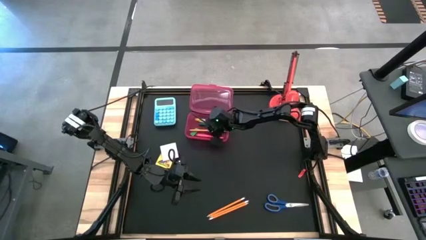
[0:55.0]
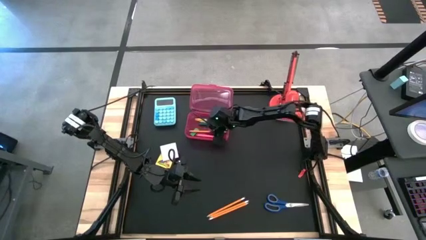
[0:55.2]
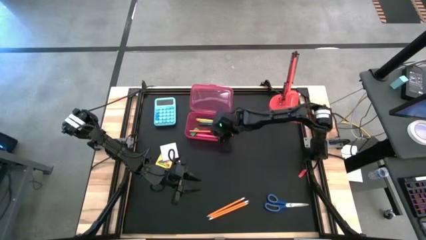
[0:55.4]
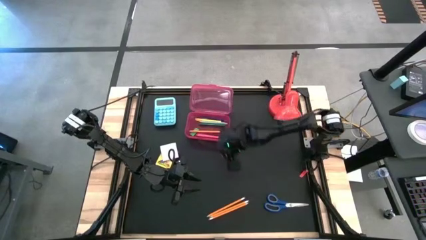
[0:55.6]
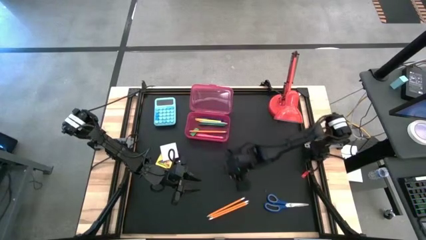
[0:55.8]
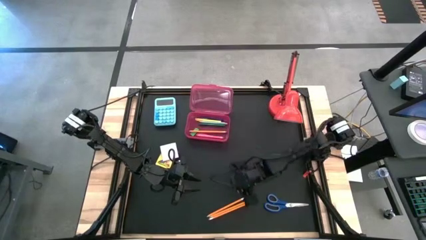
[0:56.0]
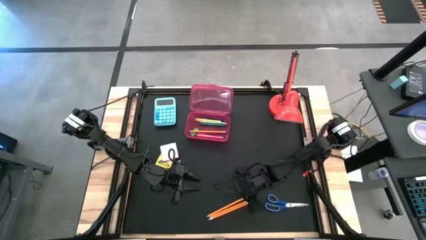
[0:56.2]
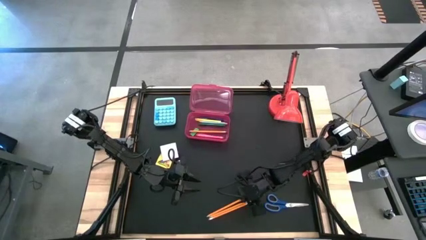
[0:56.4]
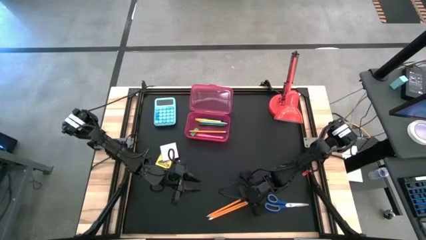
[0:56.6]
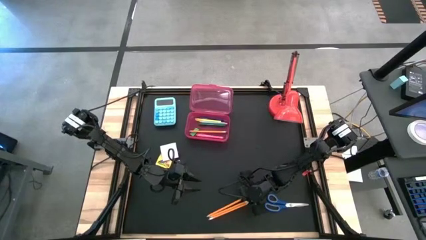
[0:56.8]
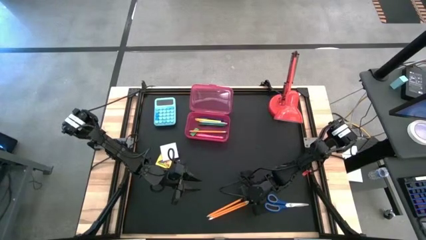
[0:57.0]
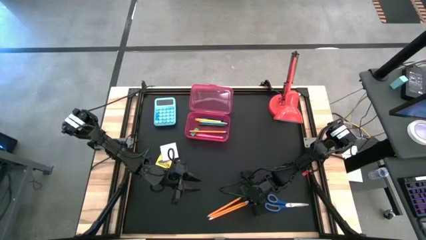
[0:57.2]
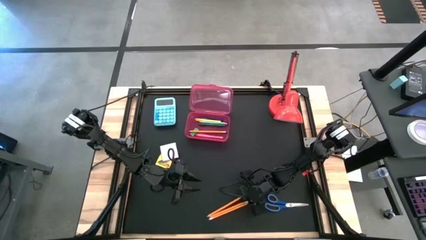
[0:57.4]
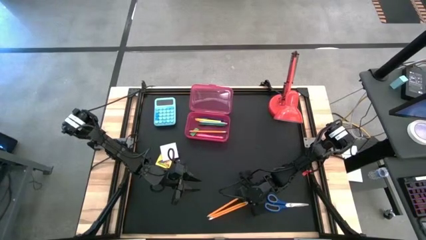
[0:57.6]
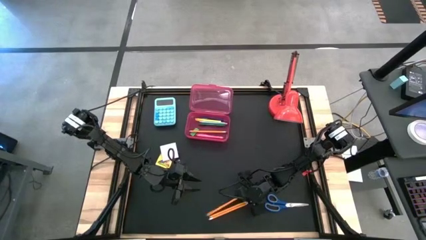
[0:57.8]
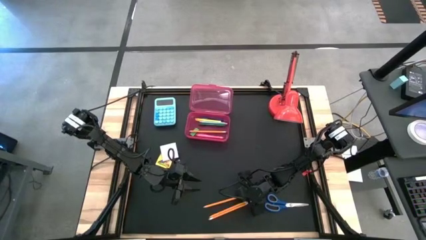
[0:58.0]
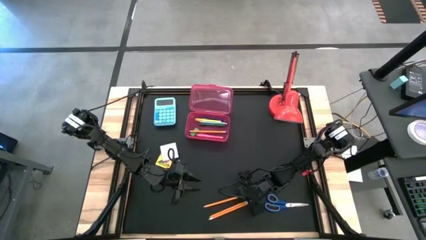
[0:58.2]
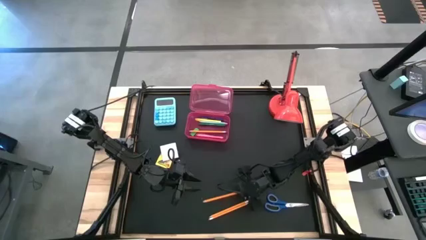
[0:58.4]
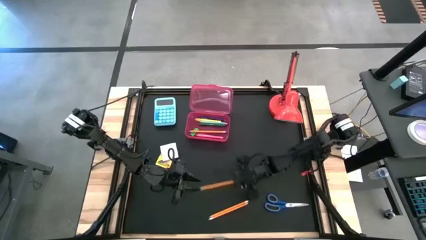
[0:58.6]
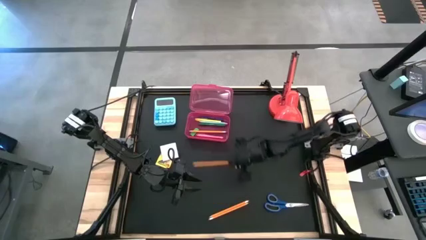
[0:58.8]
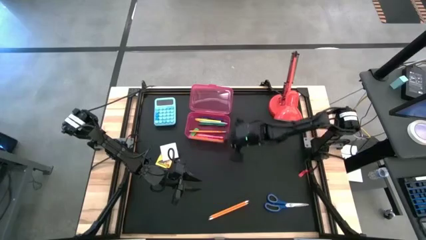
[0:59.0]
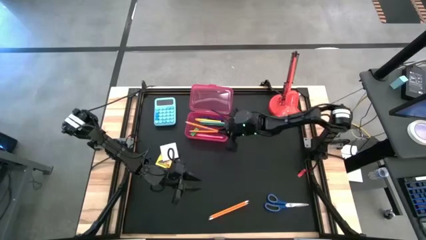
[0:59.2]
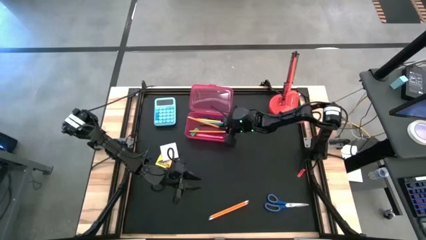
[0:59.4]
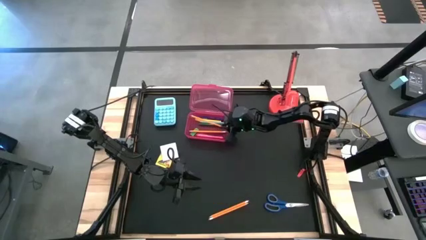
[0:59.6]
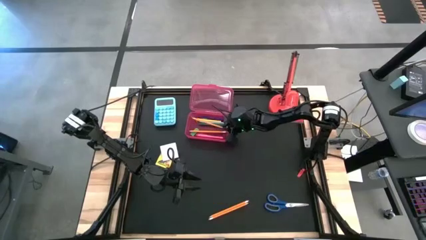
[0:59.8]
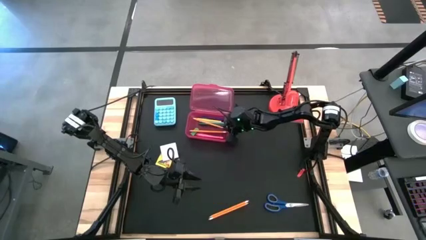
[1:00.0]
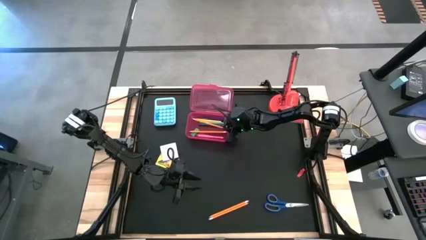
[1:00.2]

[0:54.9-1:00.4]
Task: Pack school essentials
Put the top yellow pencil into the pink supply box

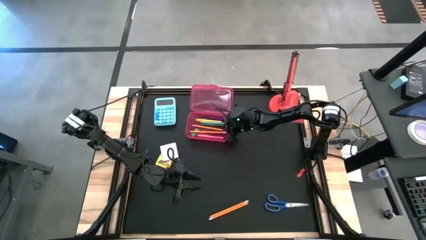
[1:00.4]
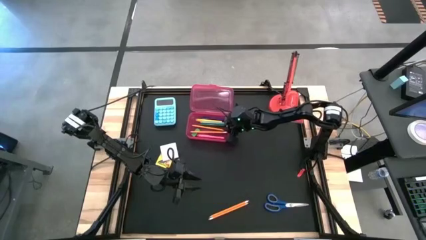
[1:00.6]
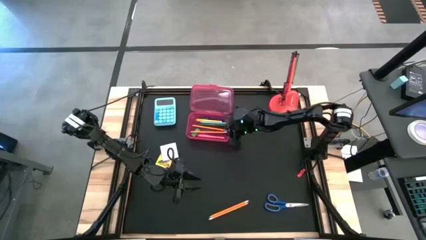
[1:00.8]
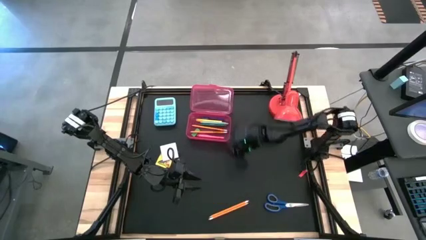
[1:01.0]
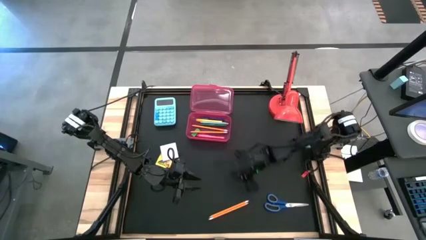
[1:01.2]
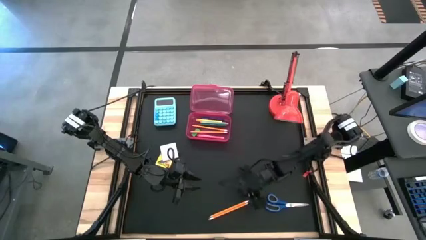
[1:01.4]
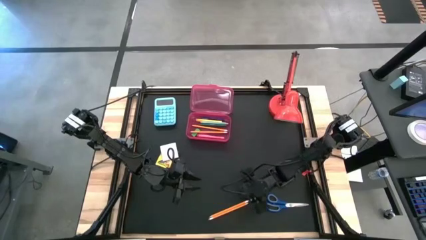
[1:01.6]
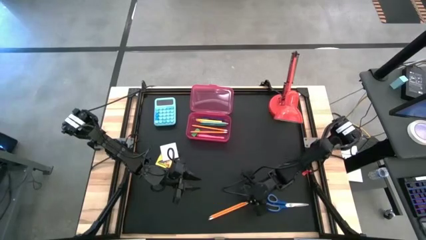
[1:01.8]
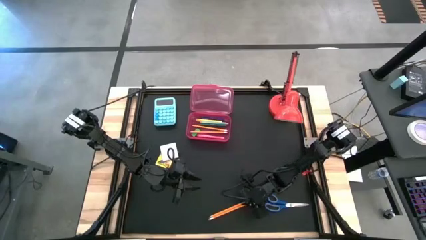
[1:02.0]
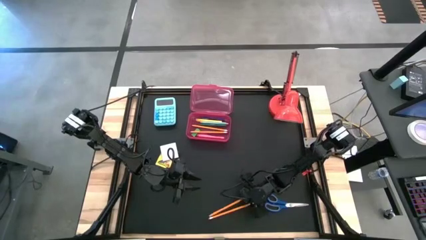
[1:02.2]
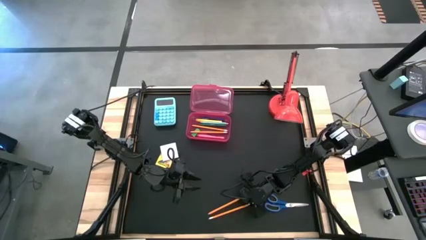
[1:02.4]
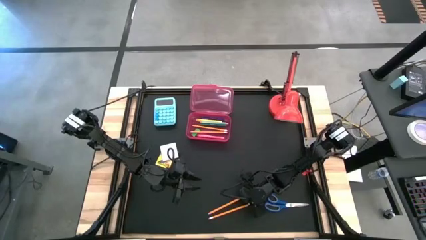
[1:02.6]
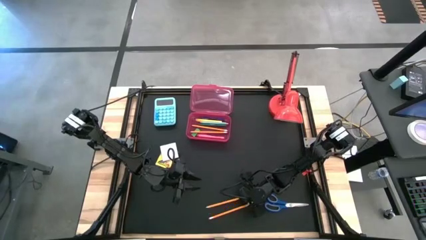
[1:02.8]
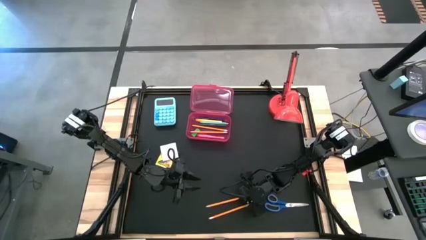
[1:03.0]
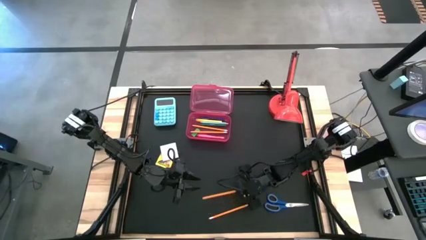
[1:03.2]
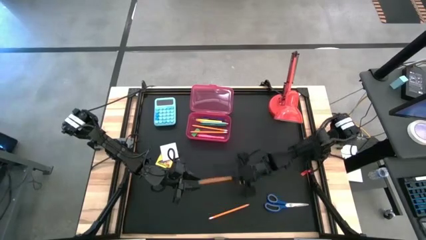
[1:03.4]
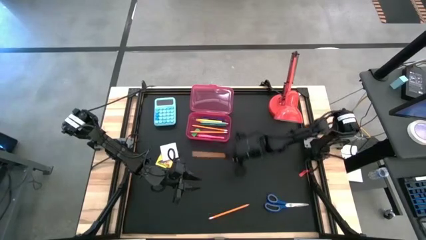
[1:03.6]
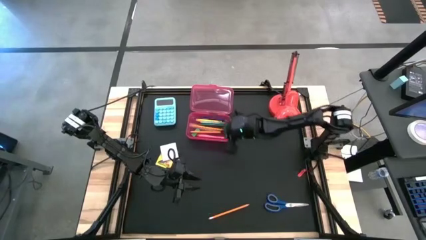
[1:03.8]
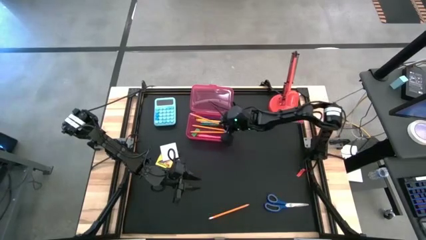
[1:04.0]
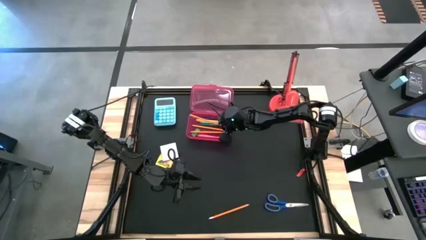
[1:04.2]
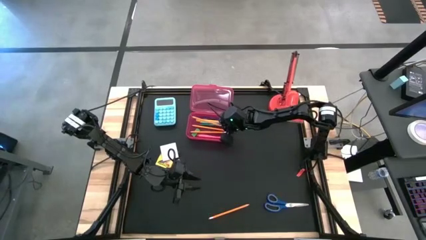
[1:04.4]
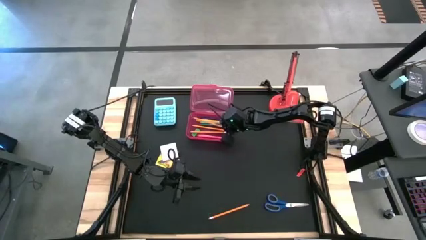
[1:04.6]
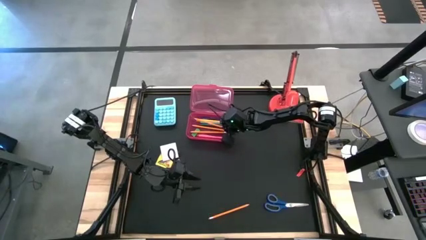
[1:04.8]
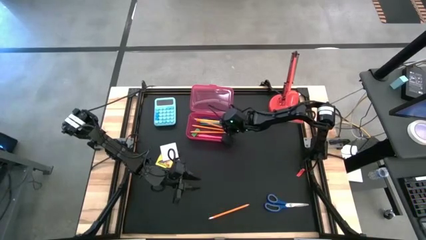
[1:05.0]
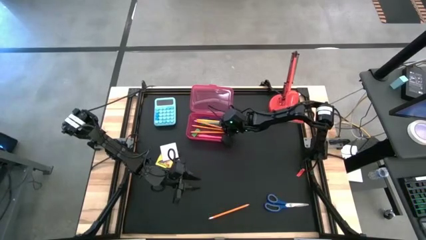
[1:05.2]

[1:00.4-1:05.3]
Put the top yellow pencil into the pink supply box

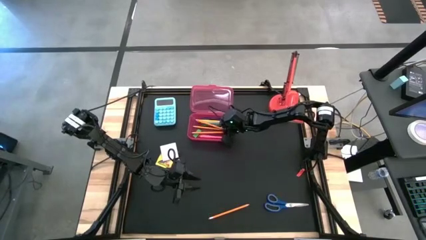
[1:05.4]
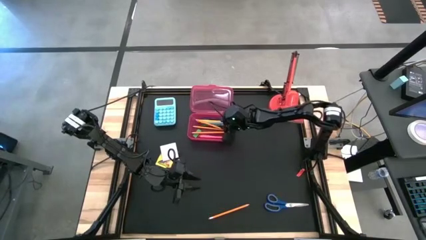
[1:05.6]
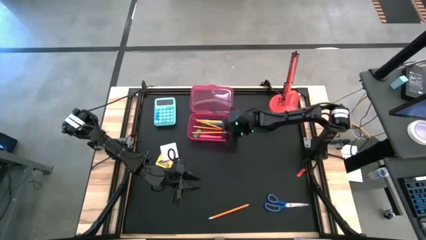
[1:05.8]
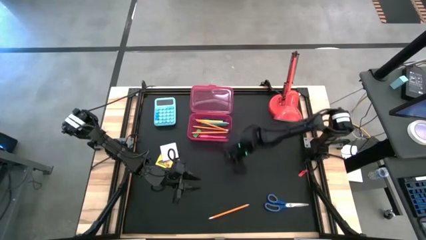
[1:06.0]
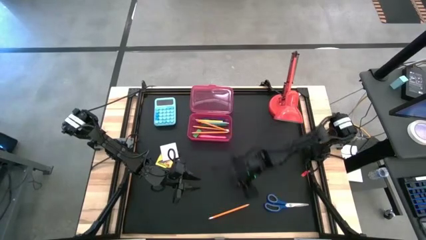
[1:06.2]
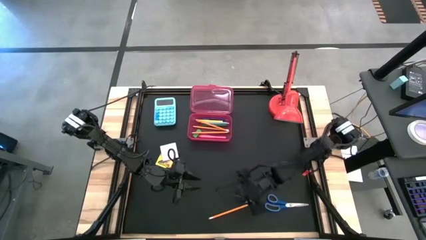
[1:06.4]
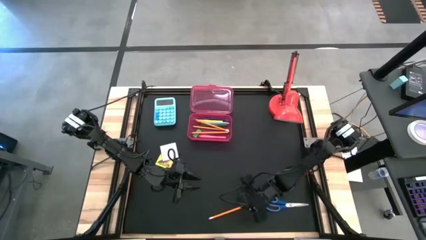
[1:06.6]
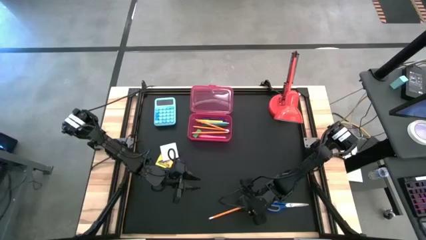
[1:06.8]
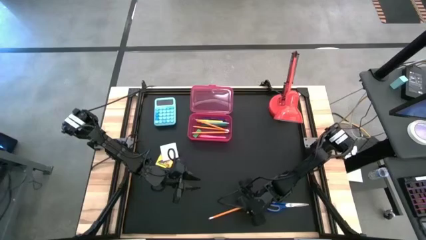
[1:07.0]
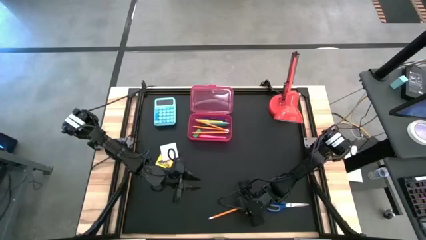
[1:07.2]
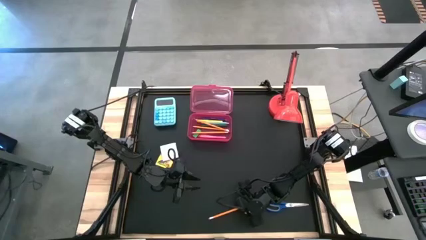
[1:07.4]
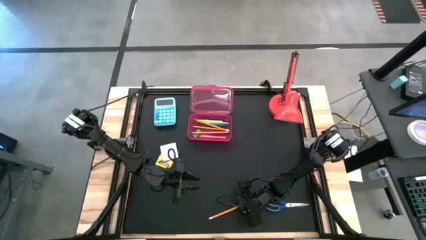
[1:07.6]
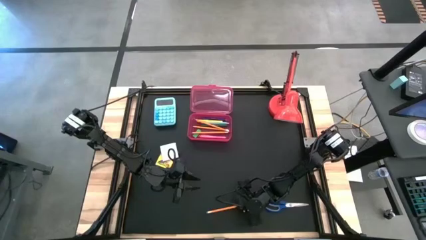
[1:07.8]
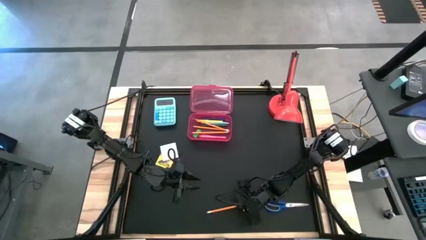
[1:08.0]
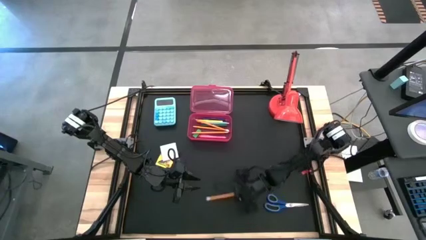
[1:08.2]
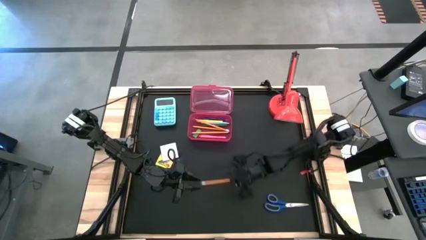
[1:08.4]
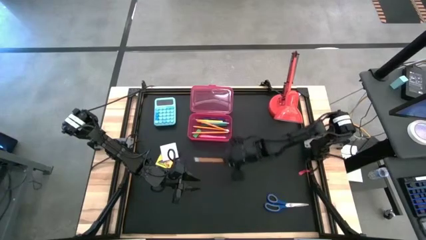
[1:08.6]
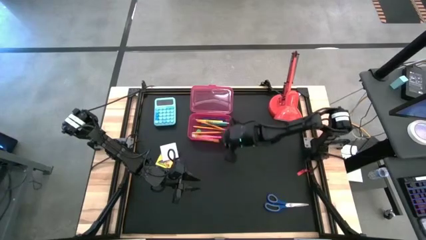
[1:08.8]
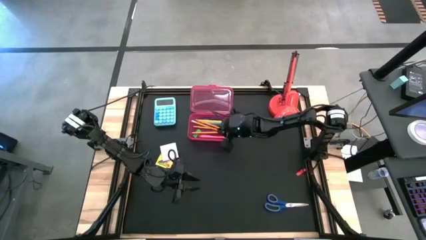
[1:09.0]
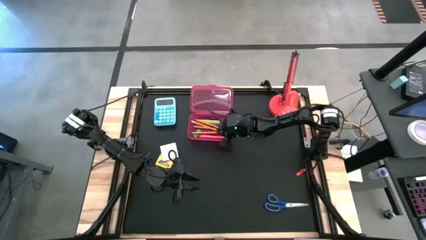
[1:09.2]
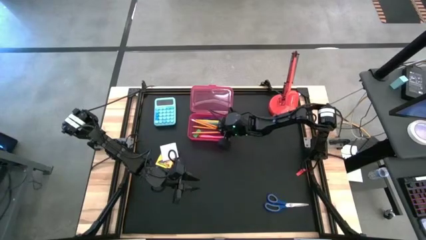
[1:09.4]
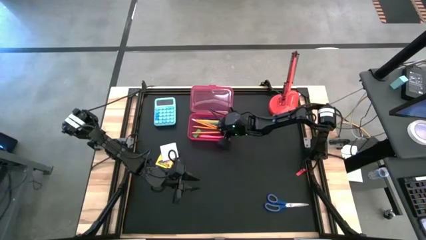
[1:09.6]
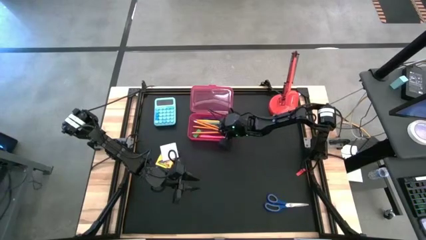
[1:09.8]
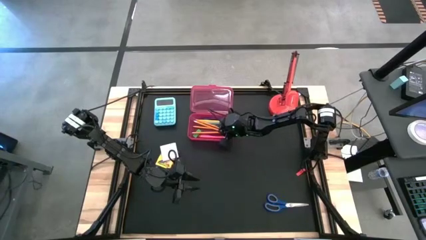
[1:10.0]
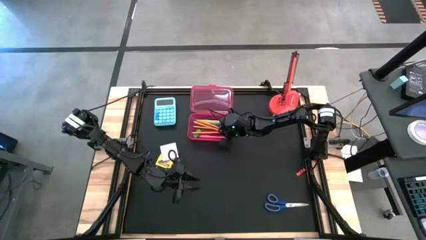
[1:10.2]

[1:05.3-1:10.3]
Put the yellow pencil into the pink supply box
